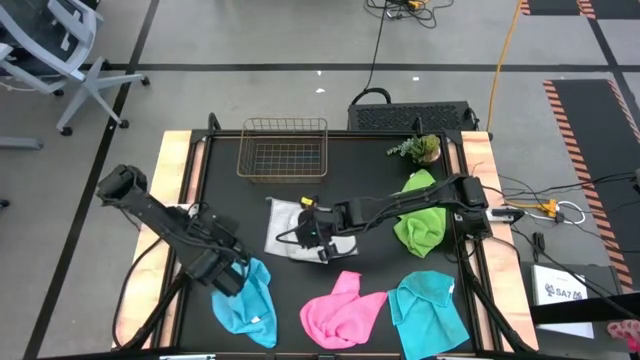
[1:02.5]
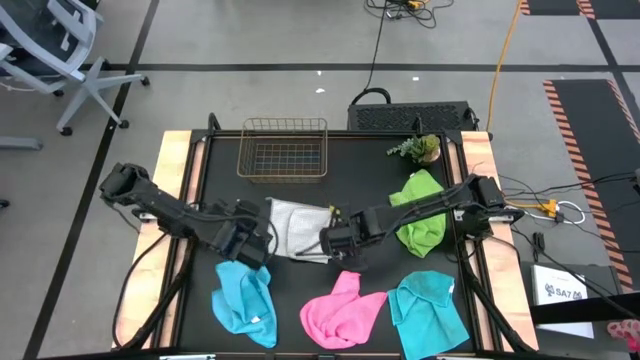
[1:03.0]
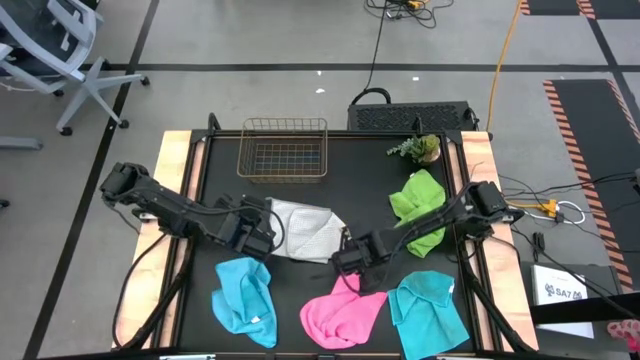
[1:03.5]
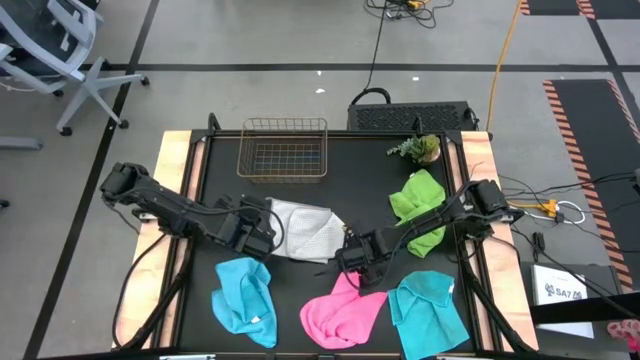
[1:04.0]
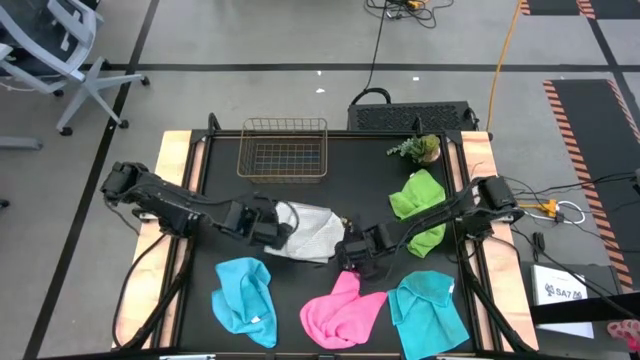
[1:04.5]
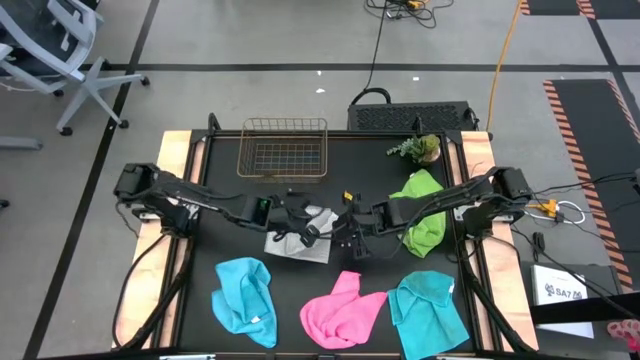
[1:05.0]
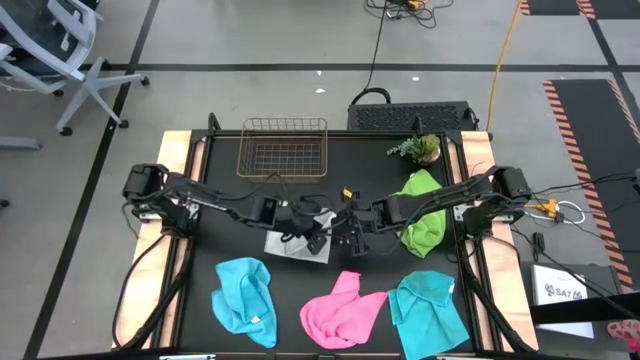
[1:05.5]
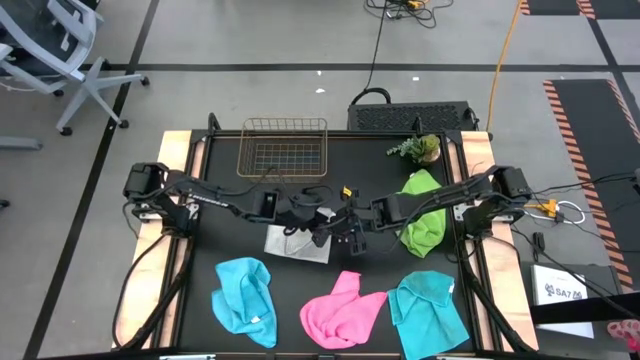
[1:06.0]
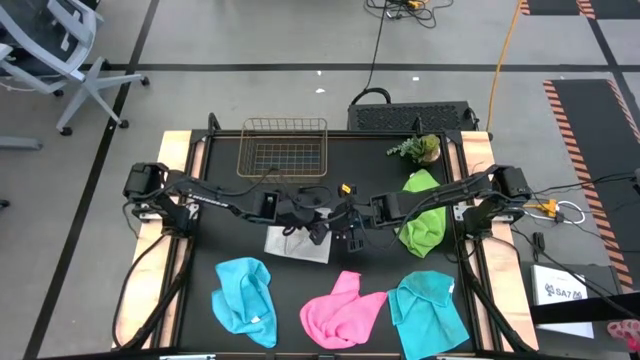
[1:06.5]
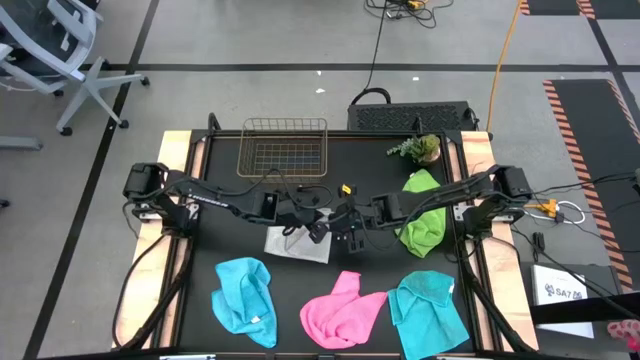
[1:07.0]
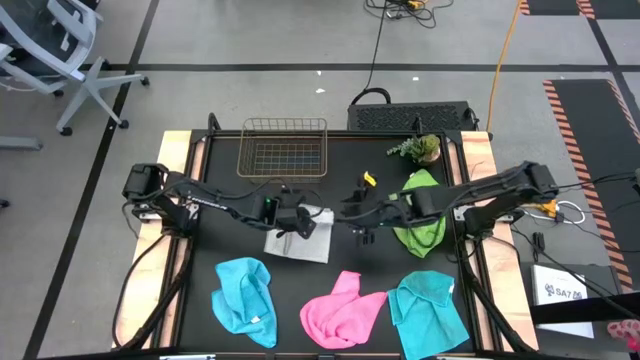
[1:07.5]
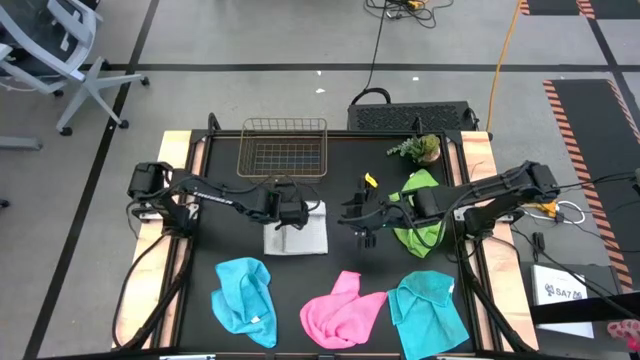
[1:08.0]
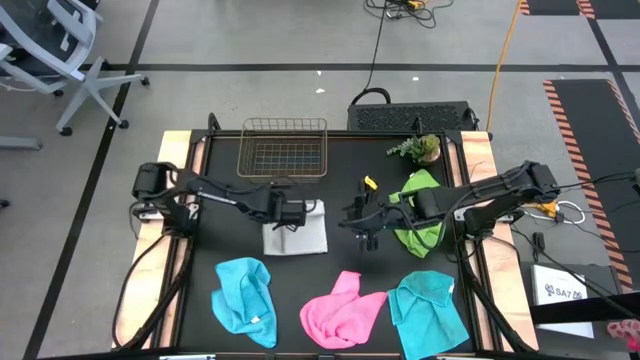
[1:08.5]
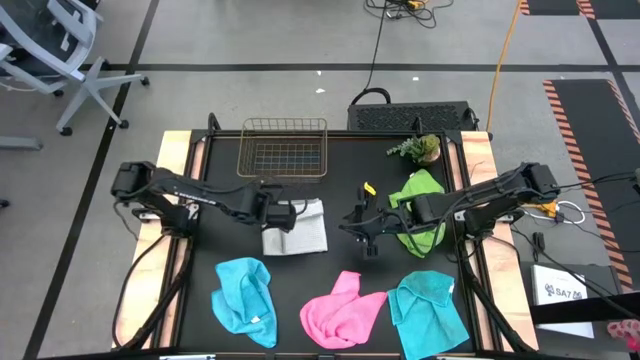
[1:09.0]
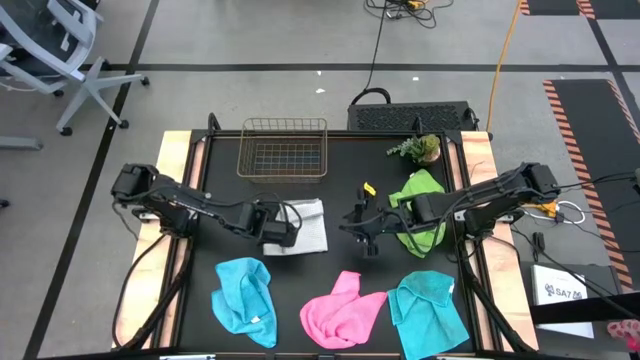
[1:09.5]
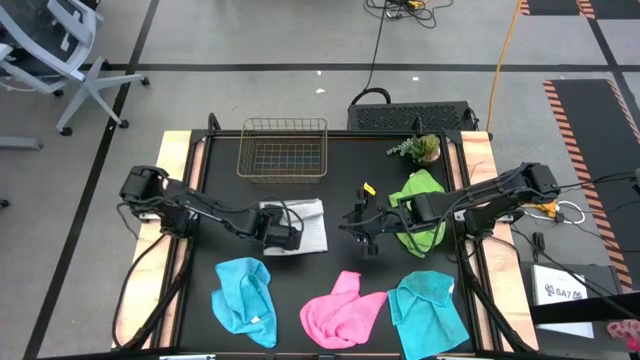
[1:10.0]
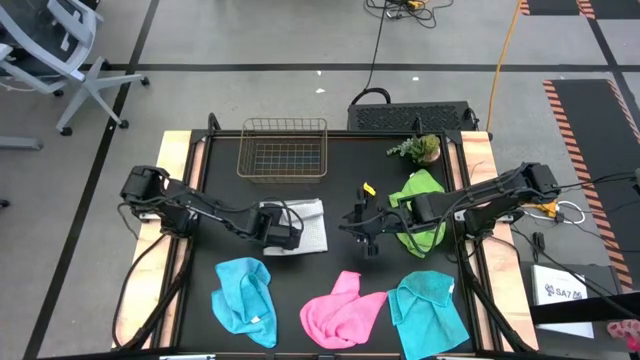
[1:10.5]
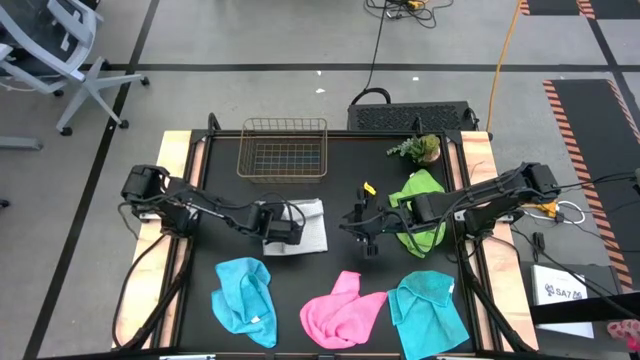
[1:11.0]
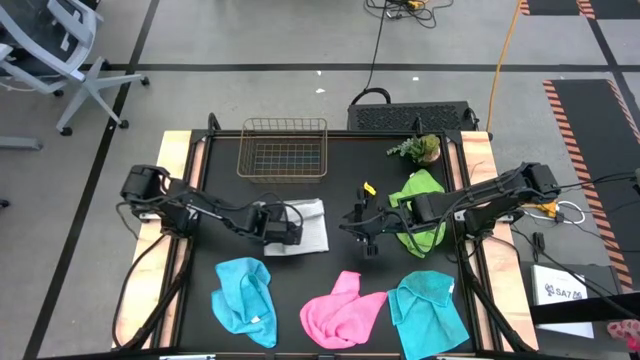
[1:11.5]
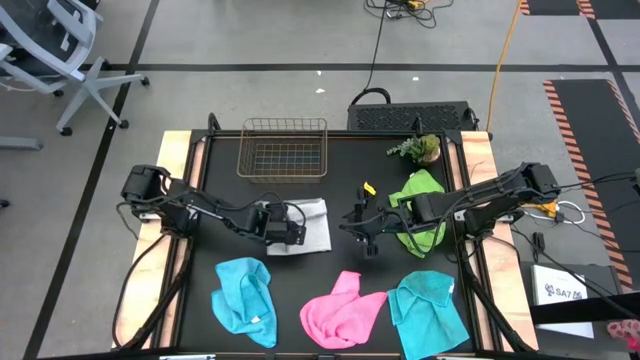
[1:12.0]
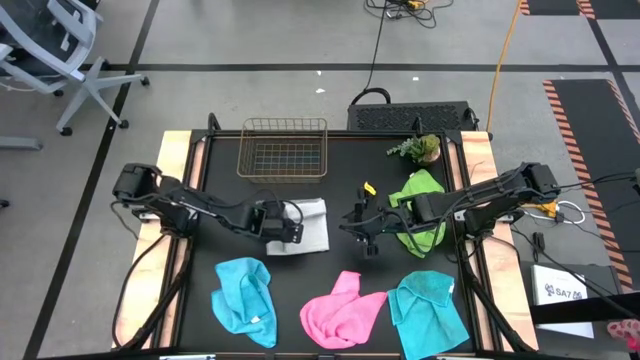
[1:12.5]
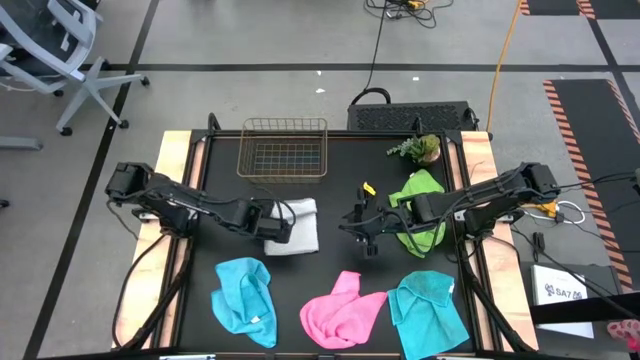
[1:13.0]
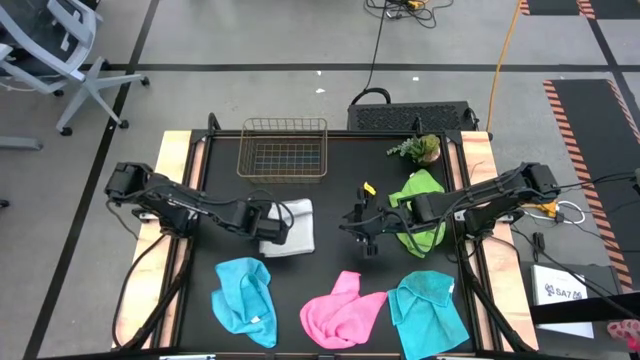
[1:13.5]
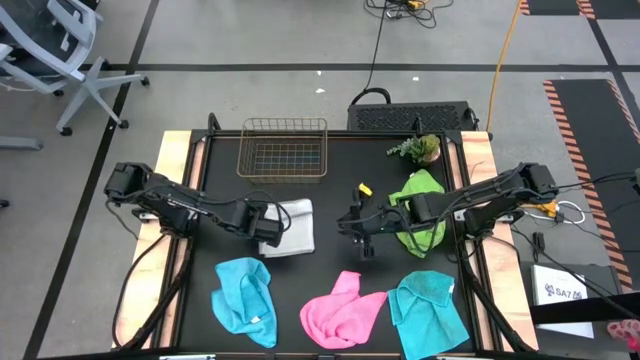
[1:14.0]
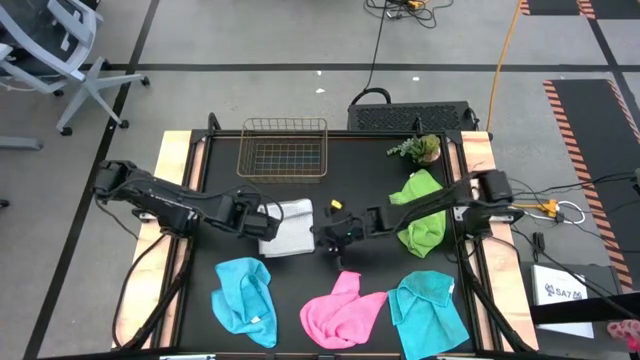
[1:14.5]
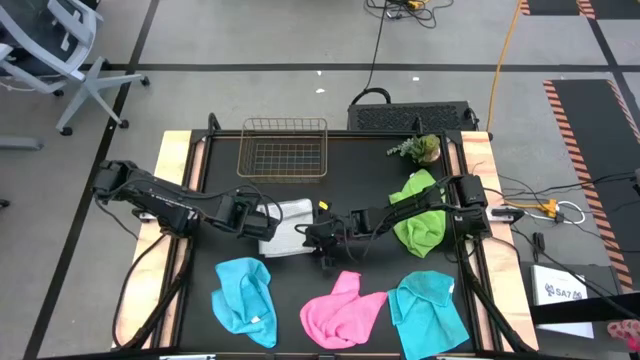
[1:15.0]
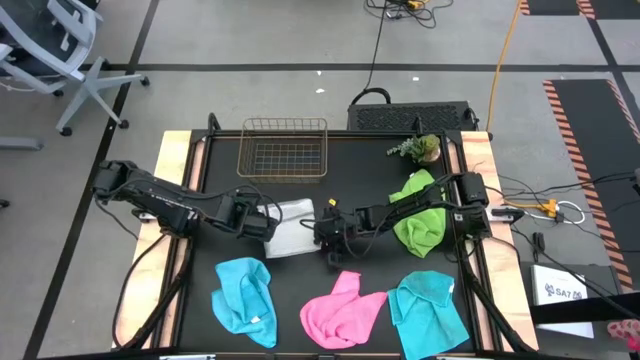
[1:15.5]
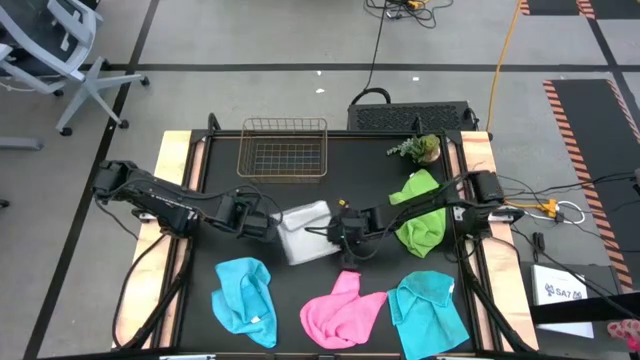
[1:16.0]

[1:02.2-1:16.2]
Task: Fold microfiber towels
Fold the gray microfiber cloth

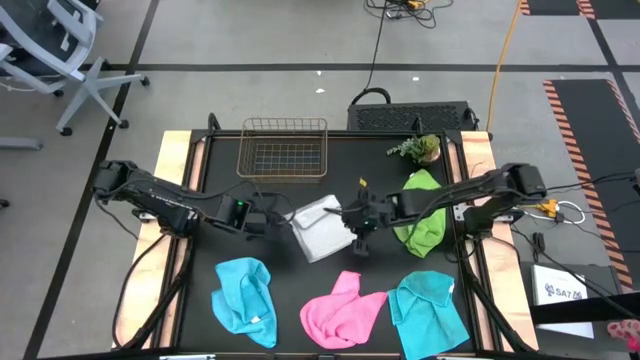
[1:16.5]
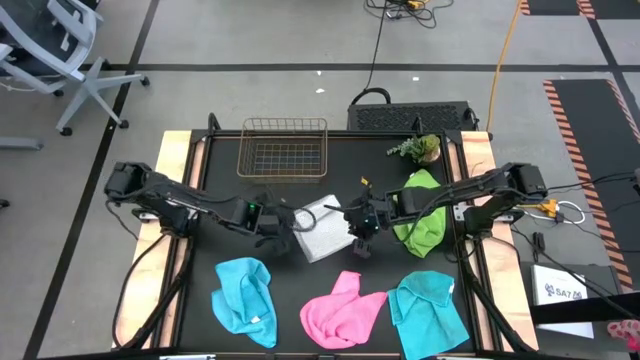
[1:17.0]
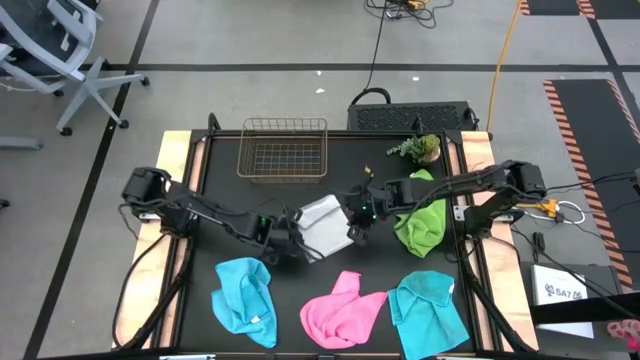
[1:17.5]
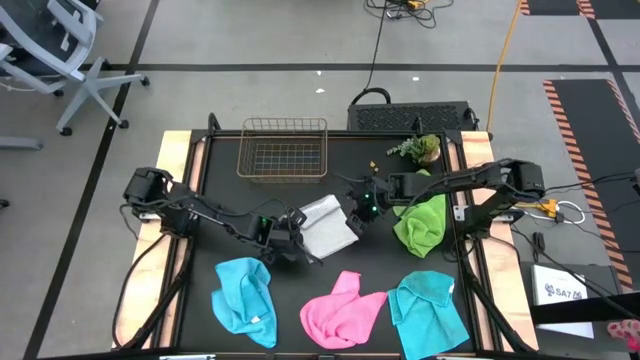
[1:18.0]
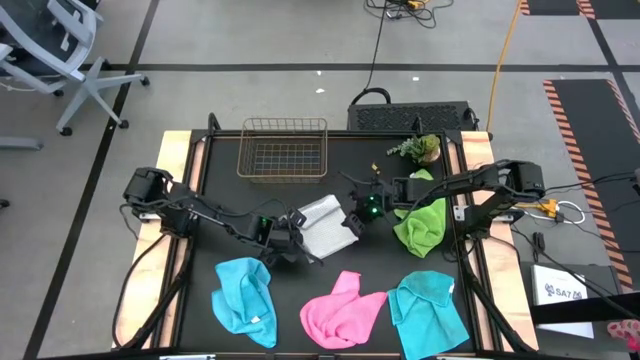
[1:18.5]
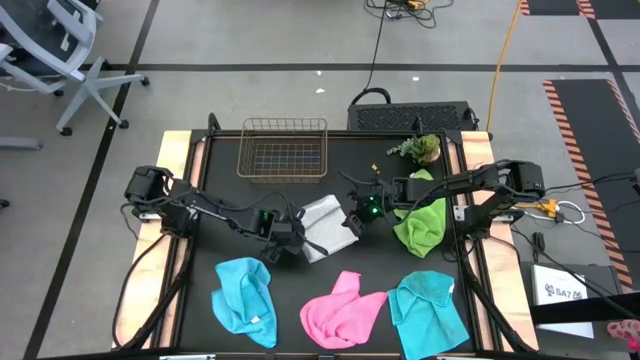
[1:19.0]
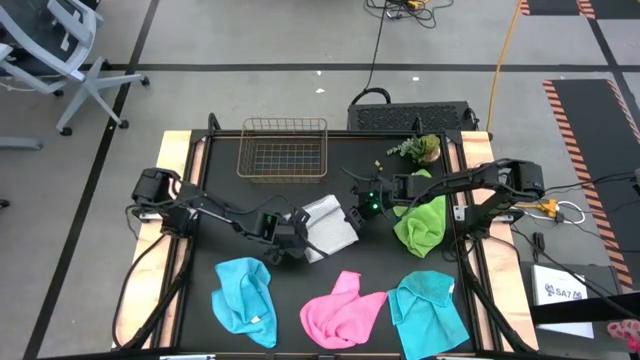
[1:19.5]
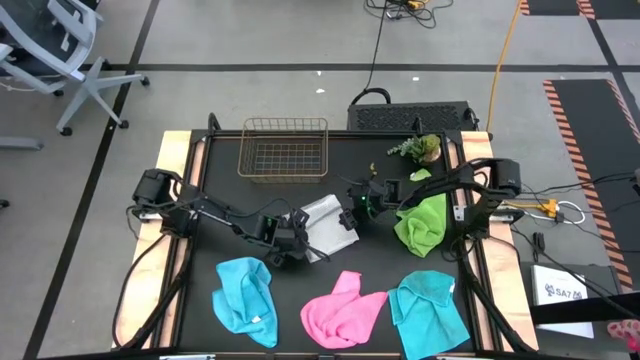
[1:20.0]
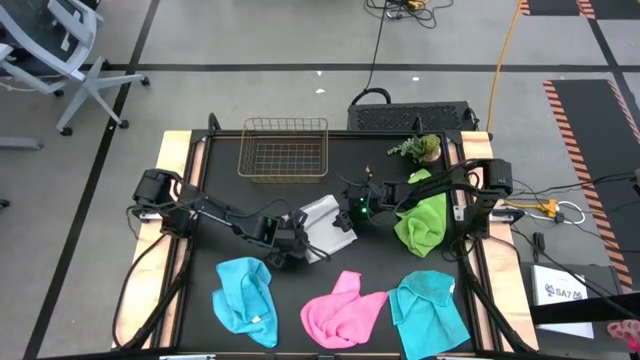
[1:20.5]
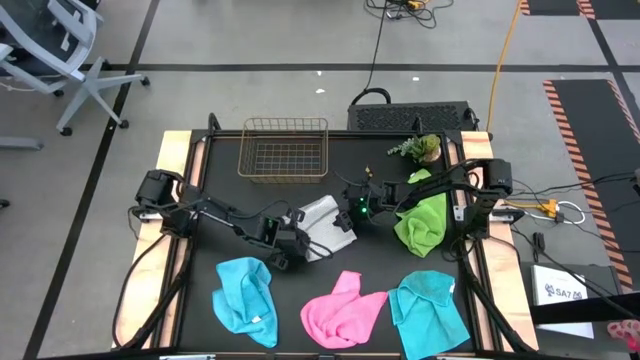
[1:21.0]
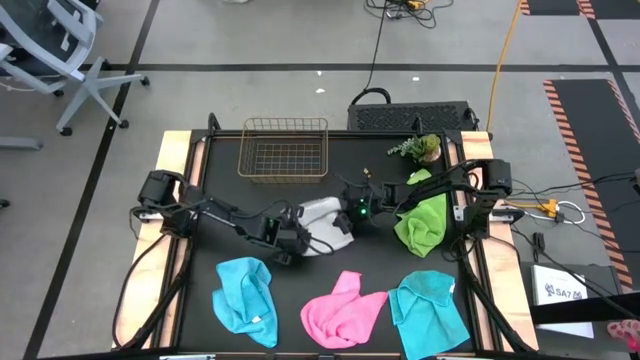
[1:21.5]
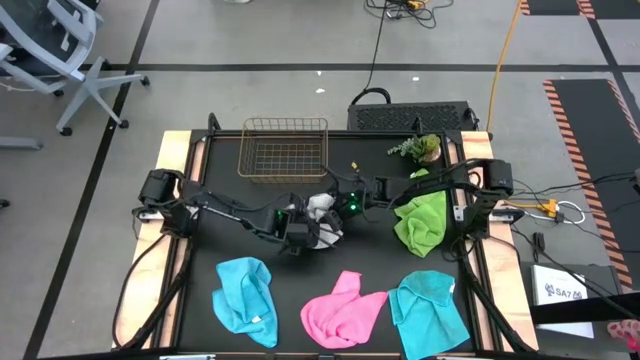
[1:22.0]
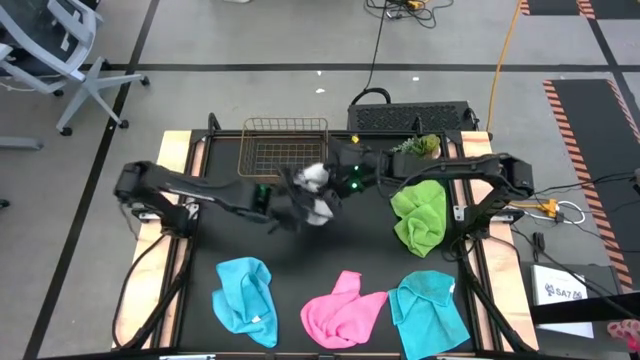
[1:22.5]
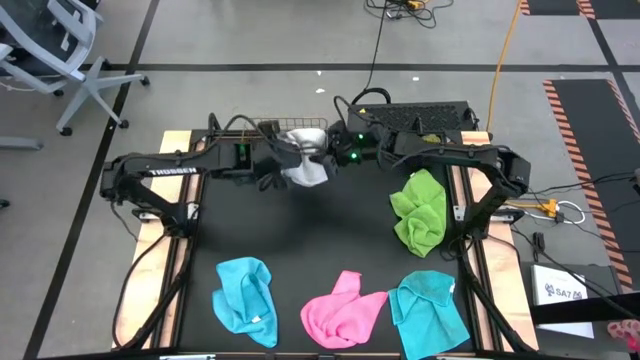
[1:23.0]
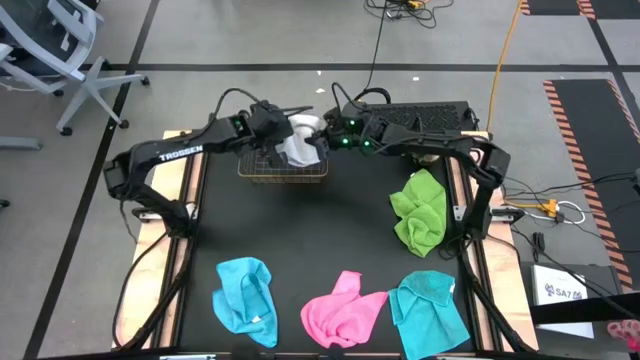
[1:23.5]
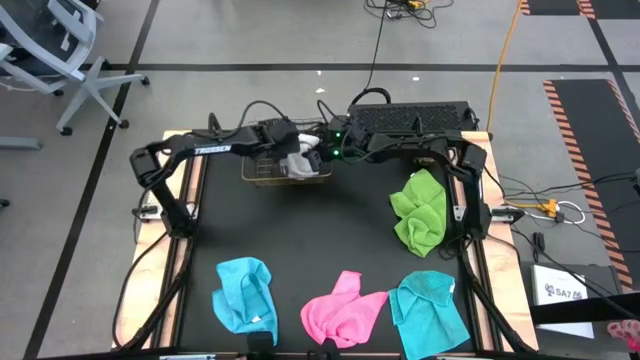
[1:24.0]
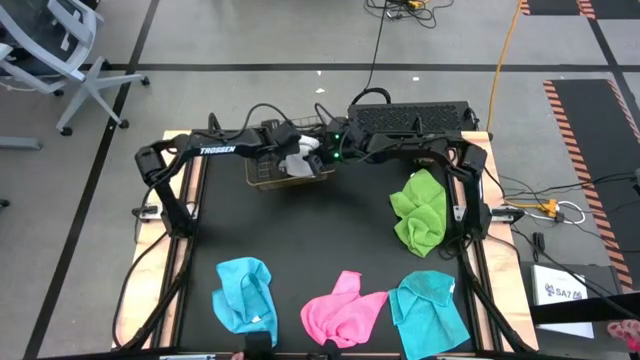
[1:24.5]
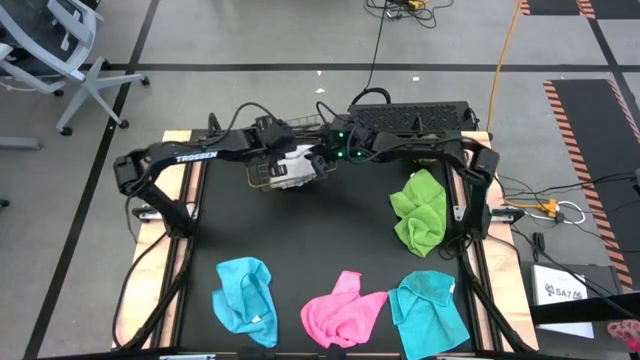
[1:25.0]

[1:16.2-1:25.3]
Put the gray microfiber cloth into the wire basket
